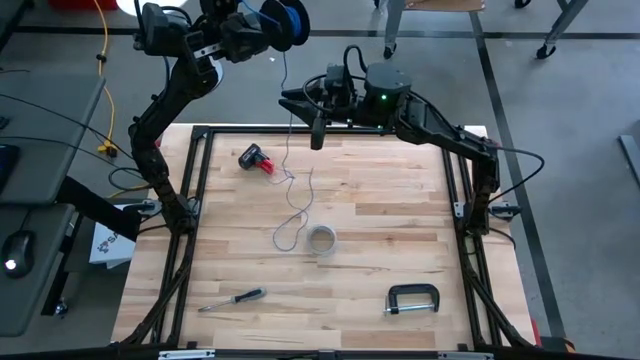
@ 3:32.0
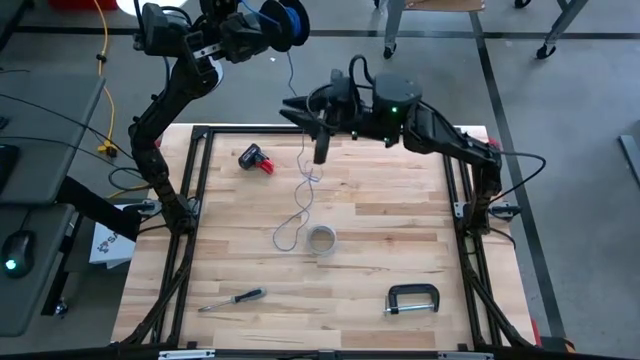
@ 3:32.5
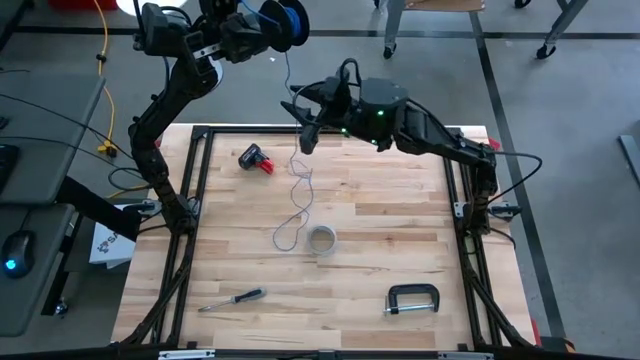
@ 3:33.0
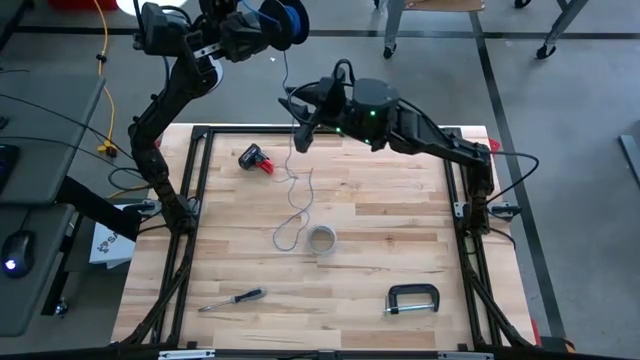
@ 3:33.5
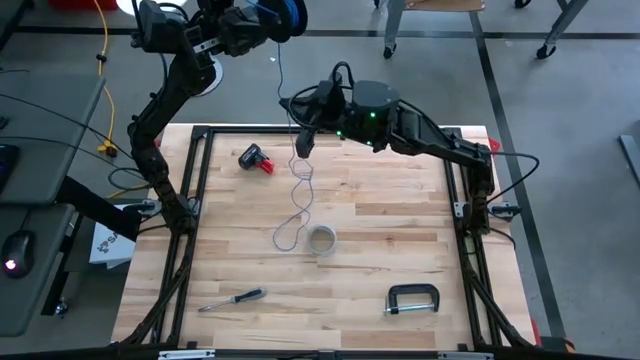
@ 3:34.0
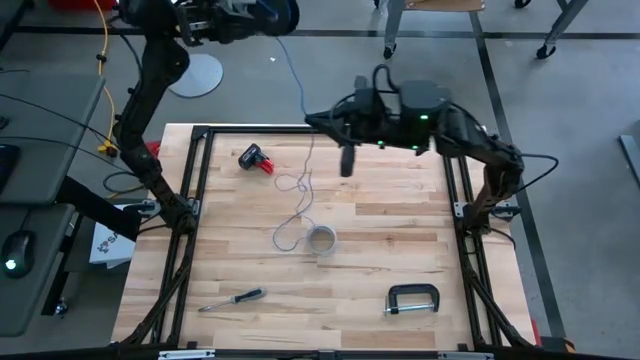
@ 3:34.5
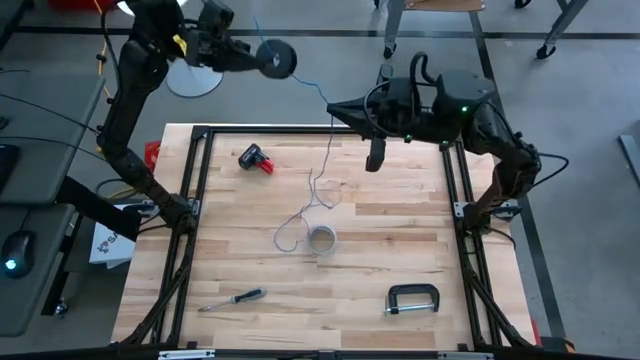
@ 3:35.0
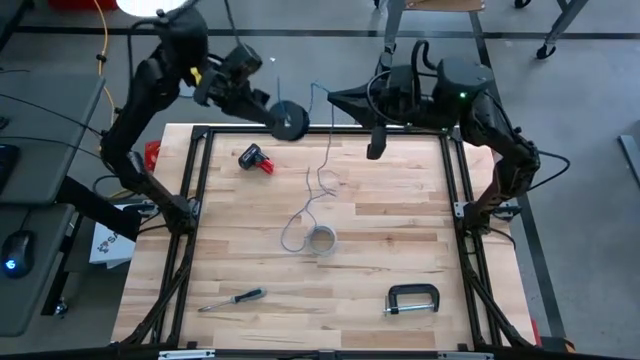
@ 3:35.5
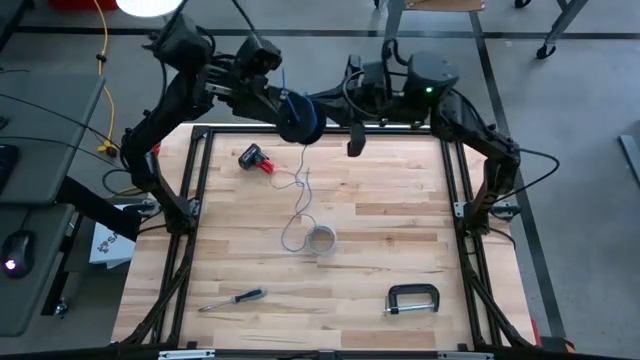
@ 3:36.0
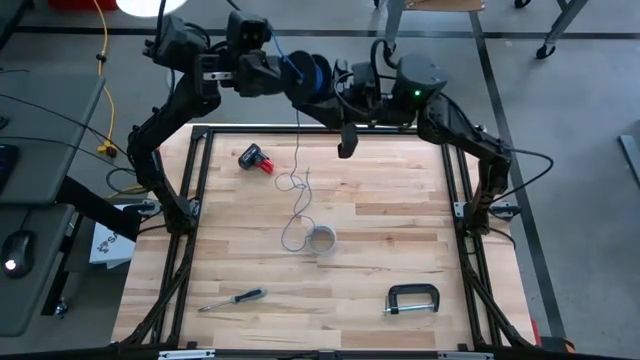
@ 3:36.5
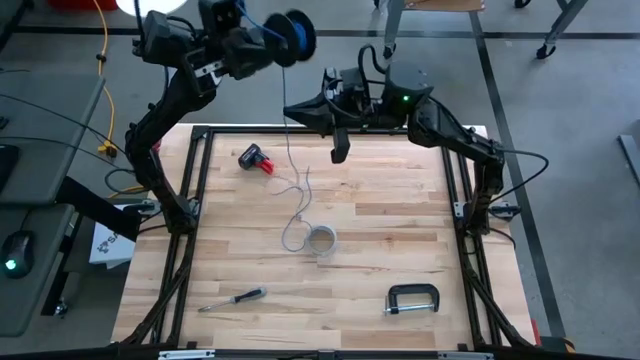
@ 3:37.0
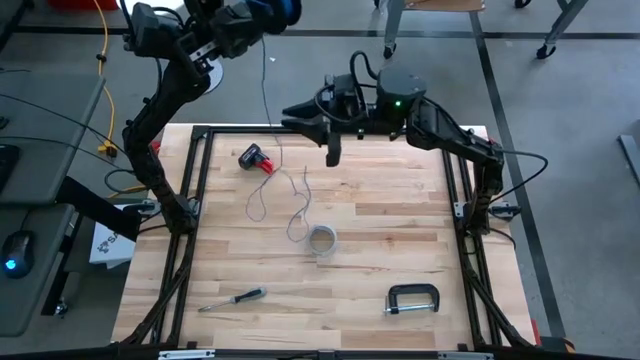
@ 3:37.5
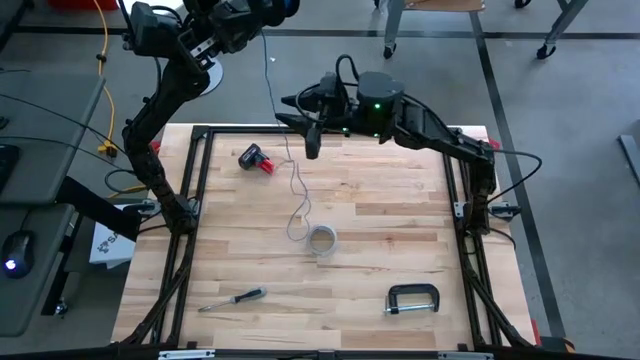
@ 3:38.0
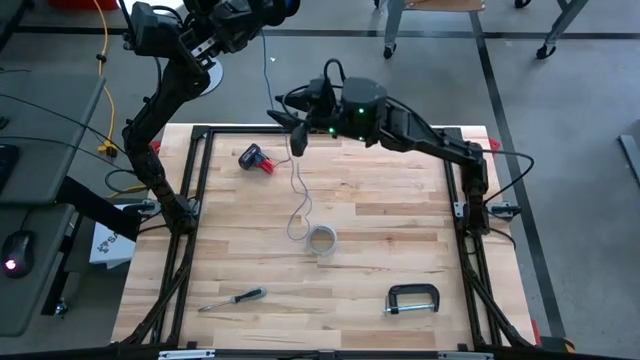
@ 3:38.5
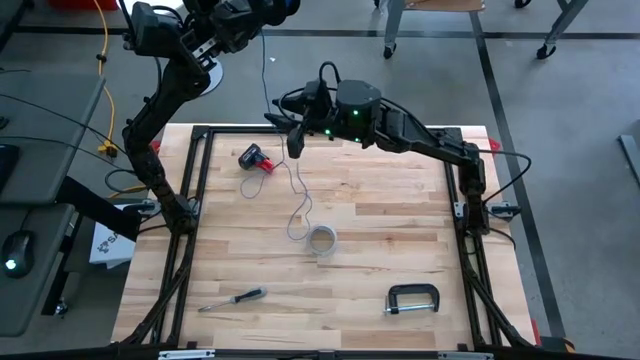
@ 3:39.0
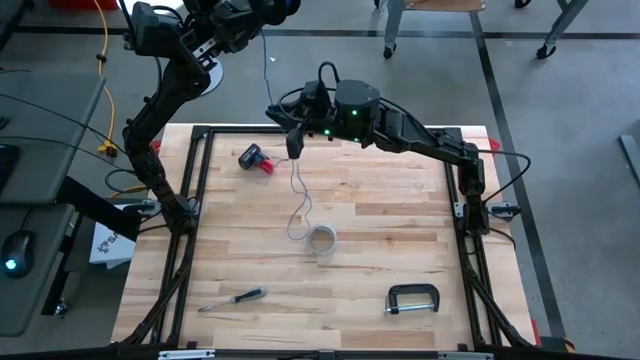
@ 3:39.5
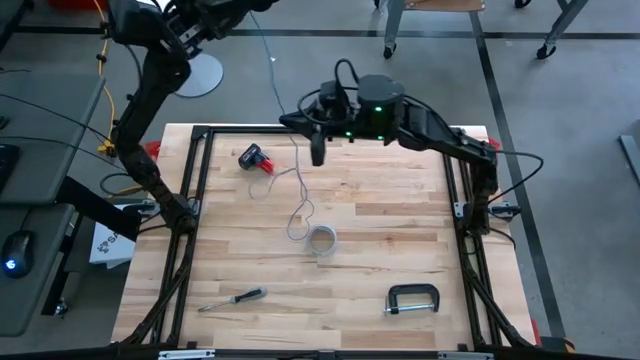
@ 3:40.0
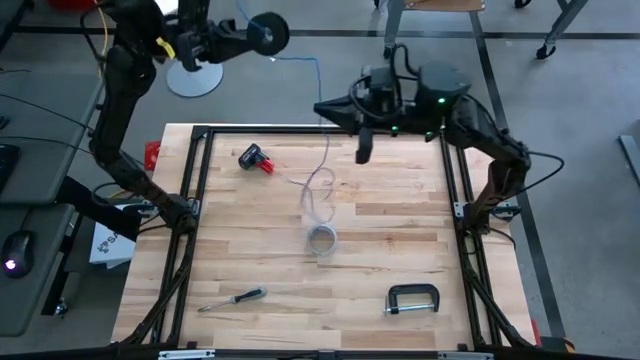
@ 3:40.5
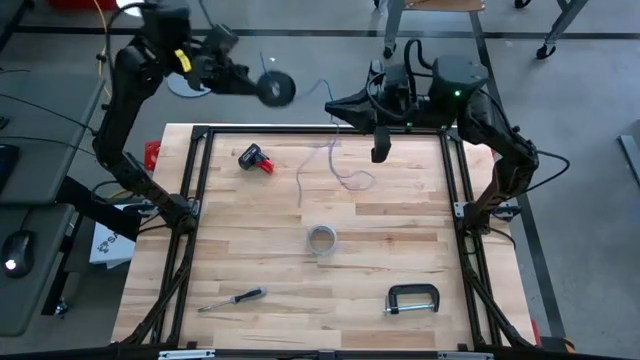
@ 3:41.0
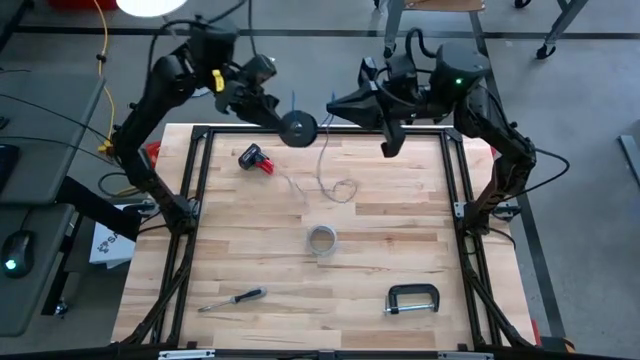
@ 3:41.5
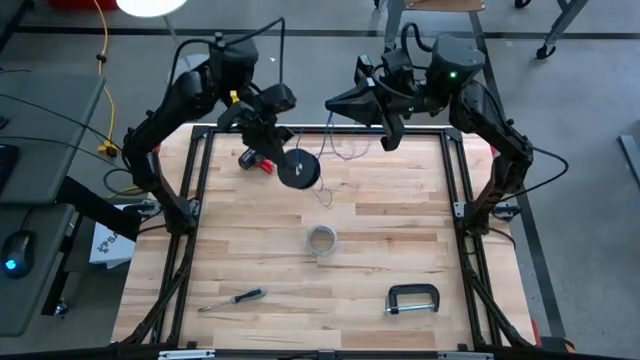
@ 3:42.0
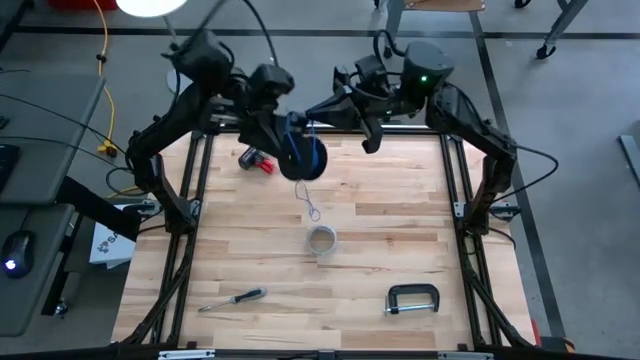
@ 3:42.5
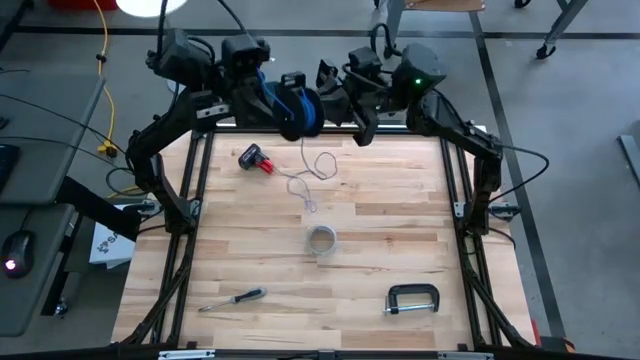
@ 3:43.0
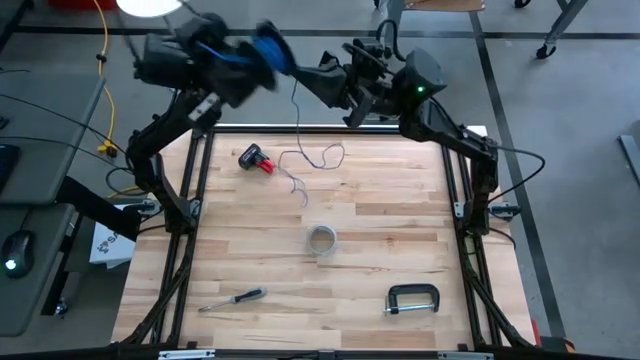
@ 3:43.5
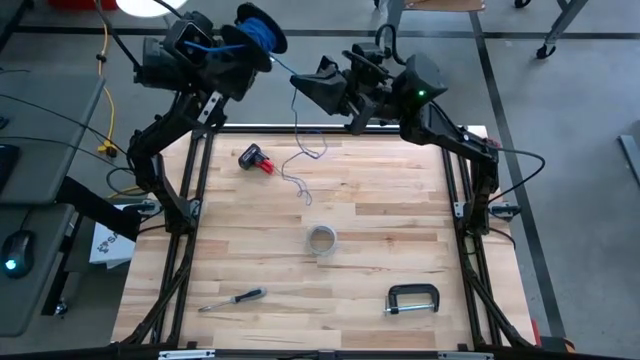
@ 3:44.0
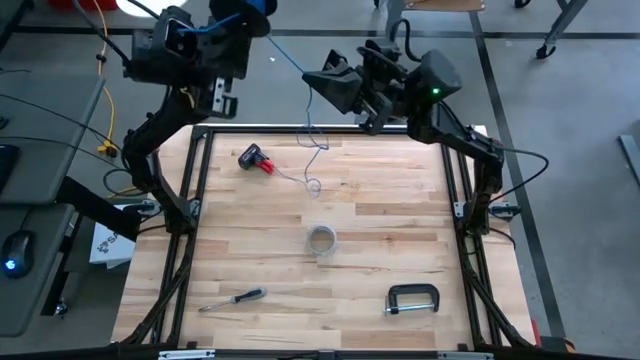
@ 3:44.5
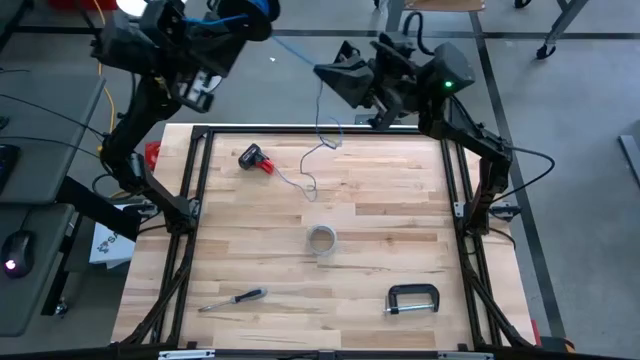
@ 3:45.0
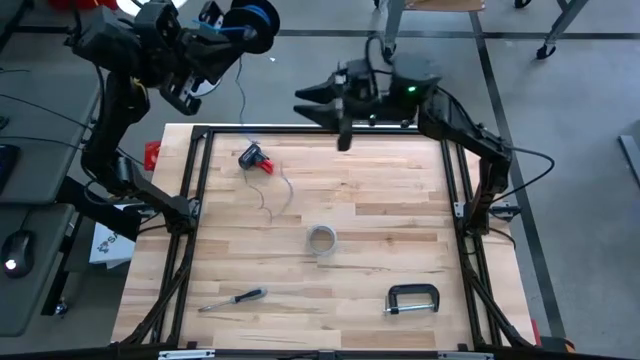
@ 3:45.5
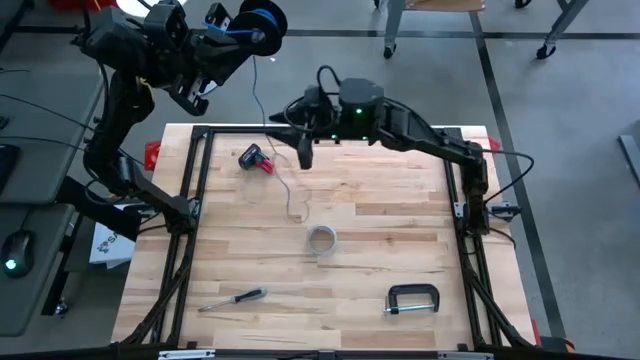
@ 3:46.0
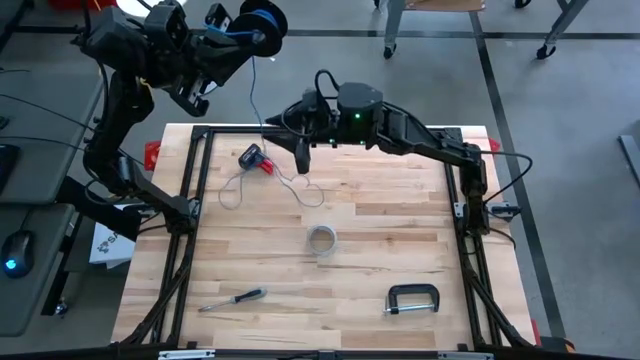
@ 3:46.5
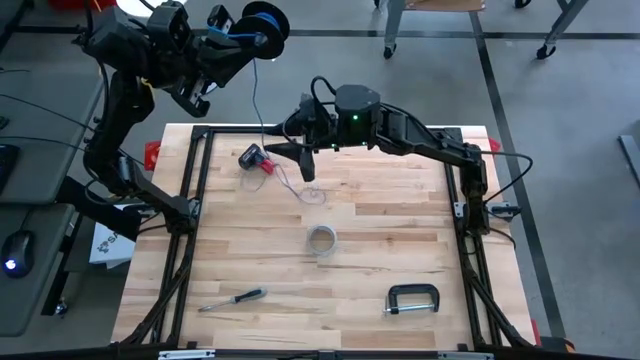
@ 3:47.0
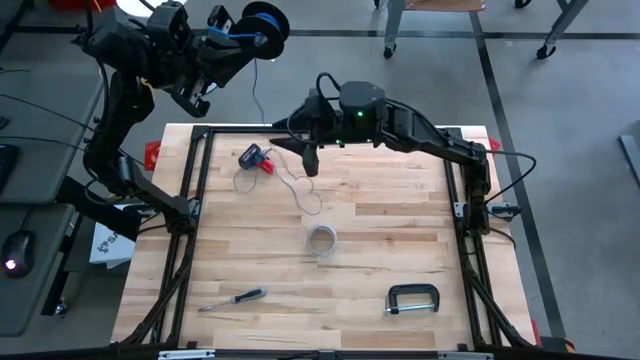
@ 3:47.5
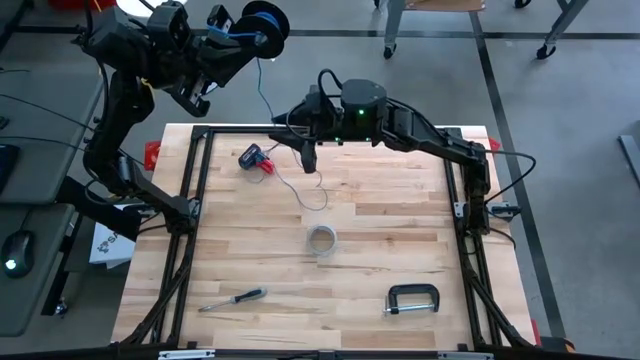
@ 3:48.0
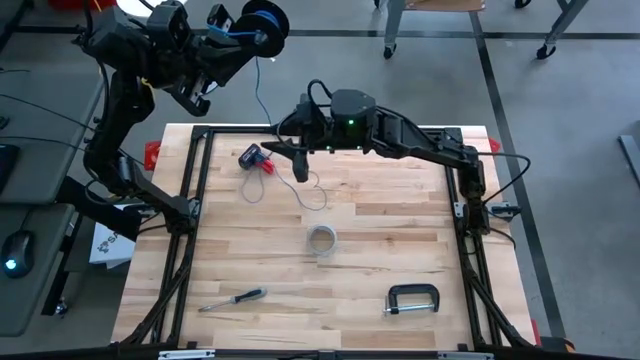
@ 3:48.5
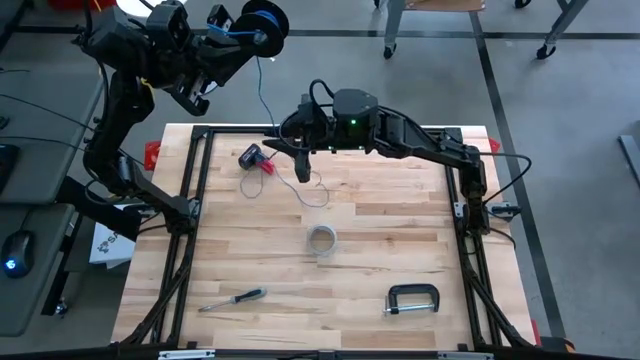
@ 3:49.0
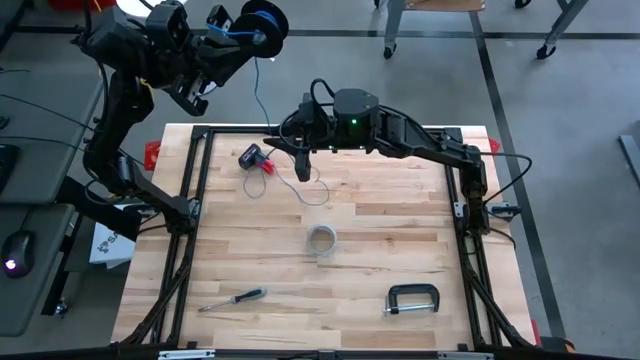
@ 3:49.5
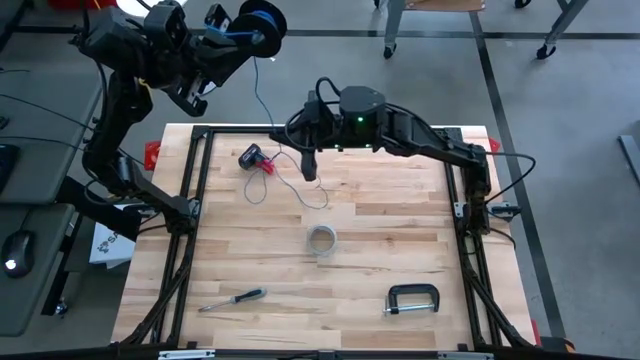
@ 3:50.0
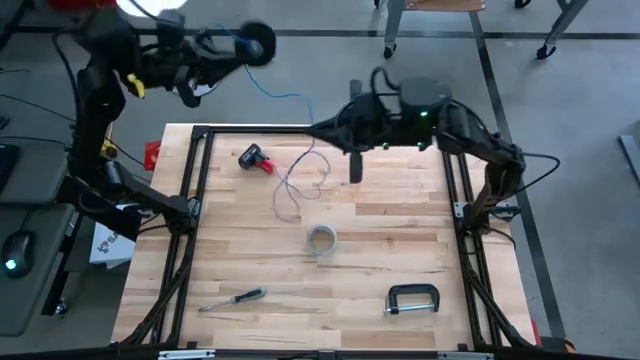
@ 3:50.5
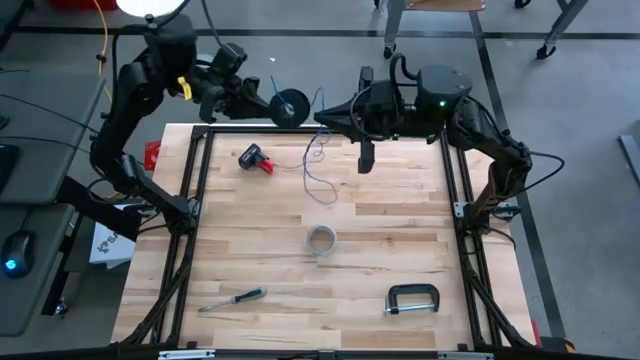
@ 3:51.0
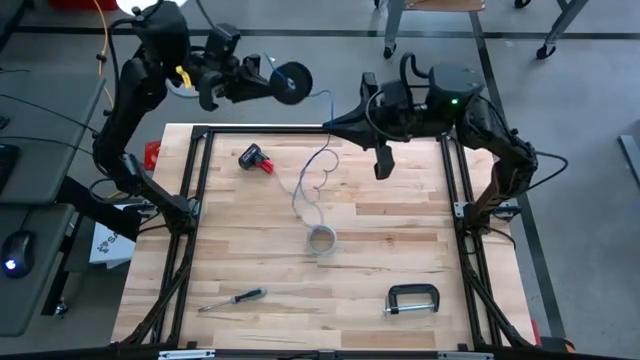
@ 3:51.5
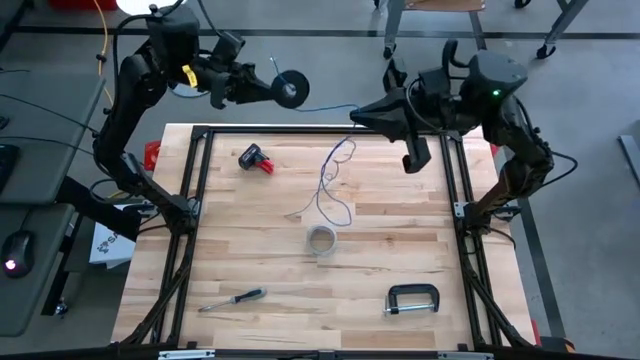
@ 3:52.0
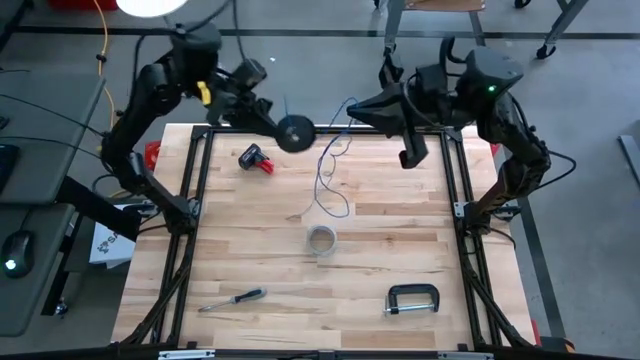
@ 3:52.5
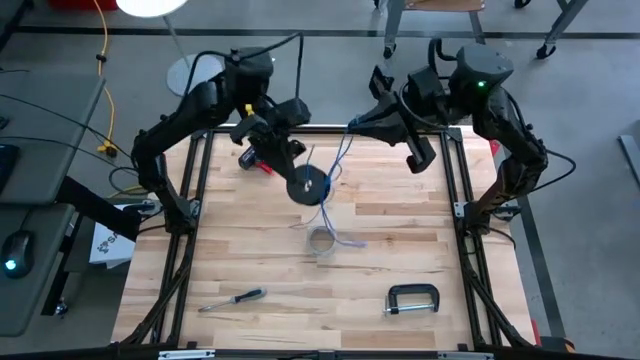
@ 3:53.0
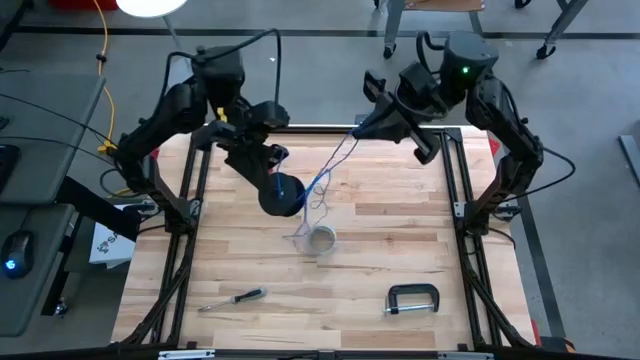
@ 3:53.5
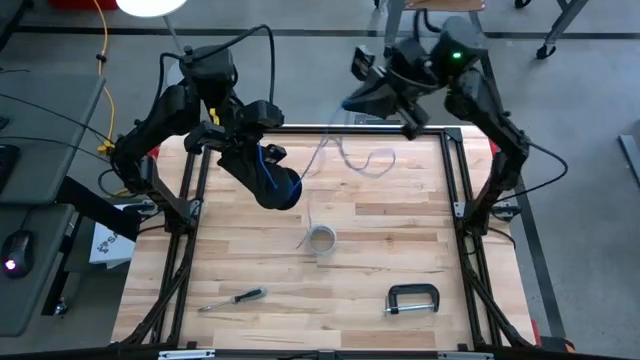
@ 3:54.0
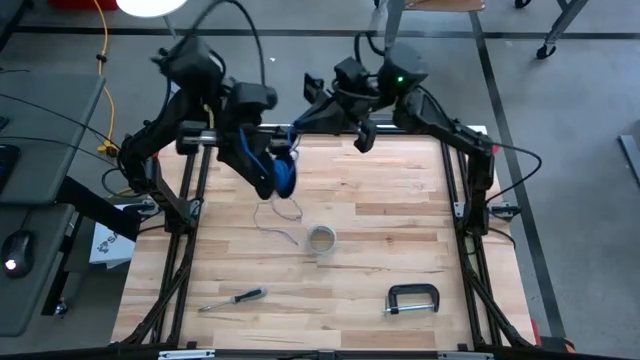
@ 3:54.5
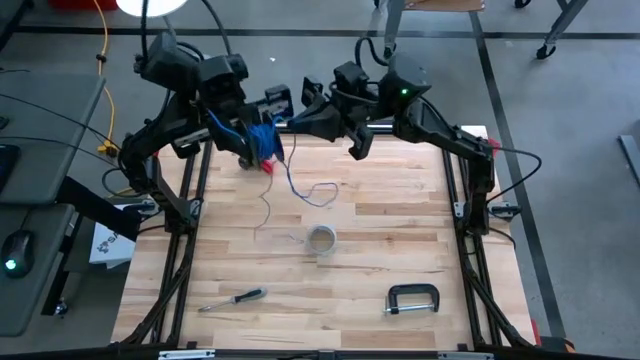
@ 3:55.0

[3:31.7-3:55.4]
Task: Coil cords
Coil the blue wire on the spool
